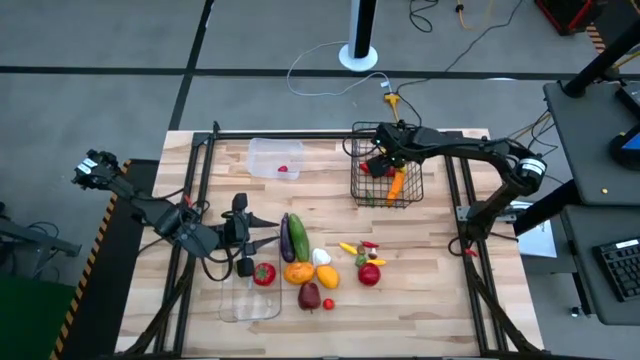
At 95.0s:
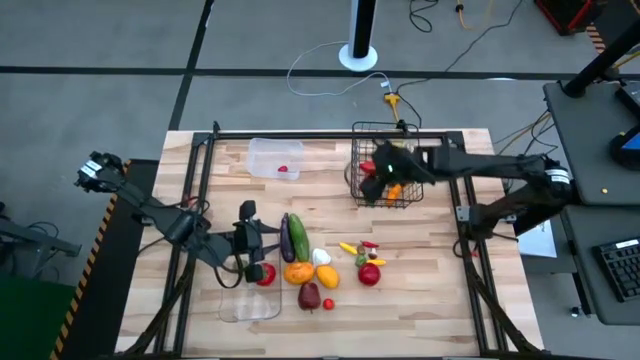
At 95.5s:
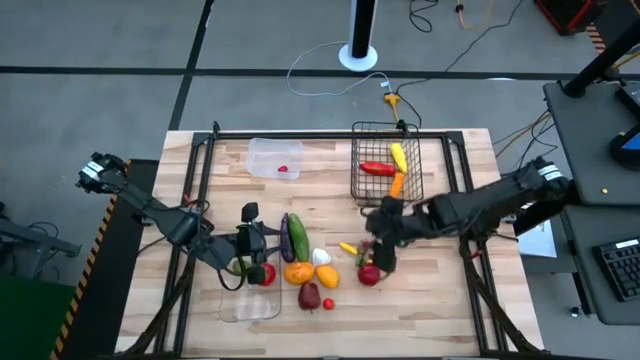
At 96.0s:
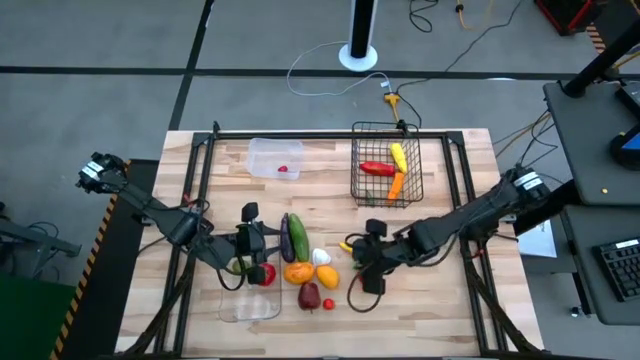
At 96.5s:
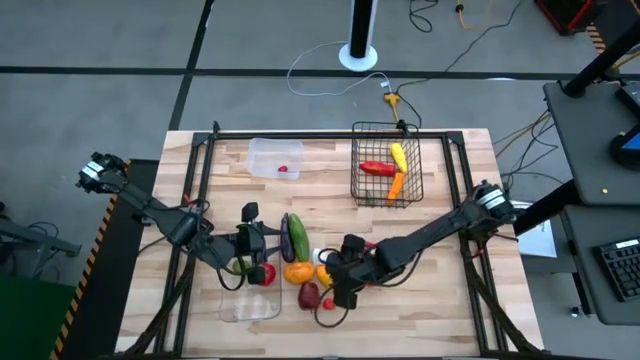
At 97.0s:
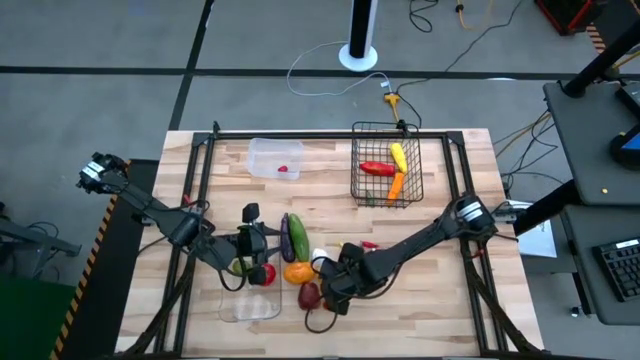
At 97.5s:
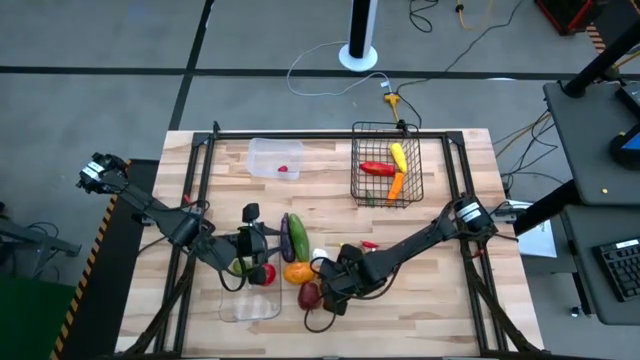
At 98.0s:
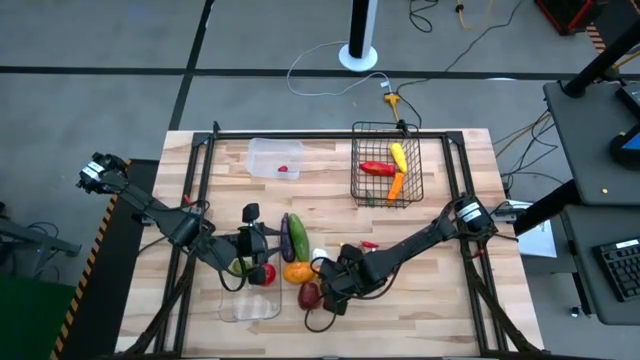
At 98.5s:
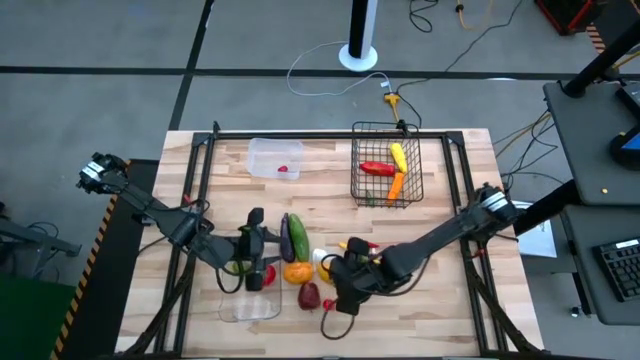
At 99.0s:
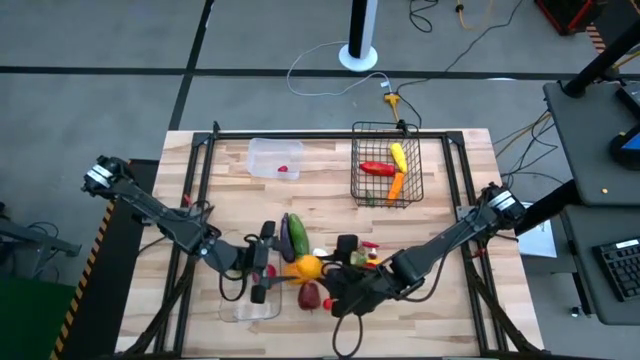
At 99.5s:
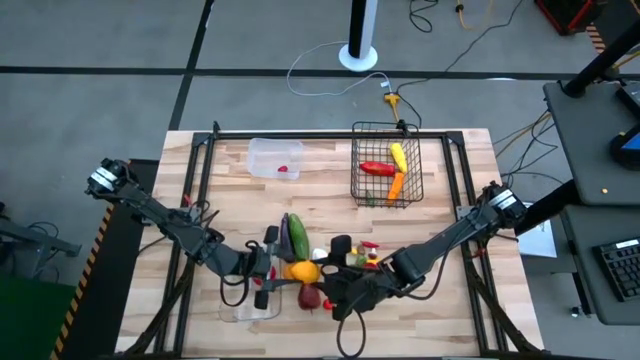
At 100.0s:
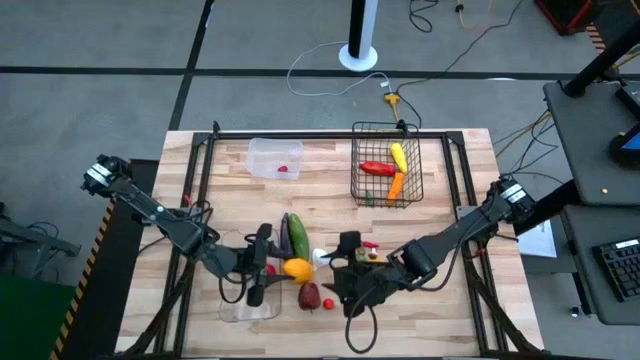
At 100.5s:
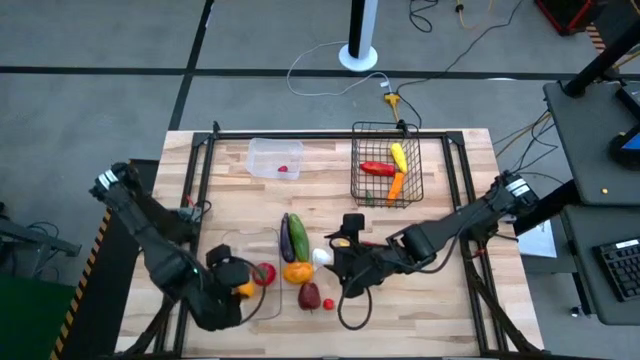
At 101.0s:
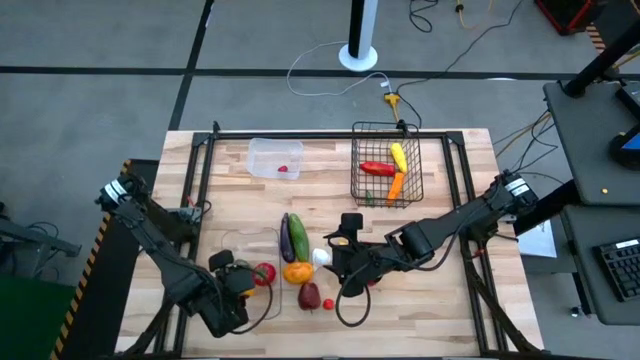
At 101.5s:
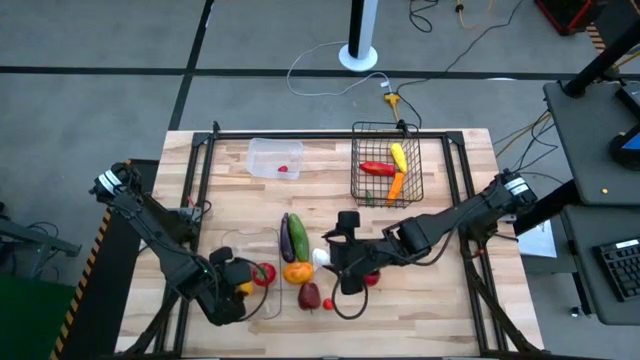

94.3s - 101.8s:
Task: Sort produce into baskets
Put the orange into the transparent bin

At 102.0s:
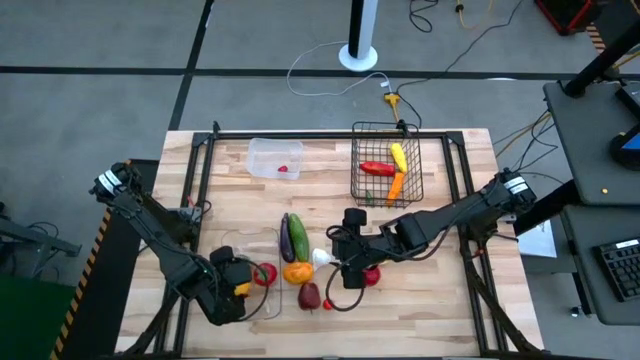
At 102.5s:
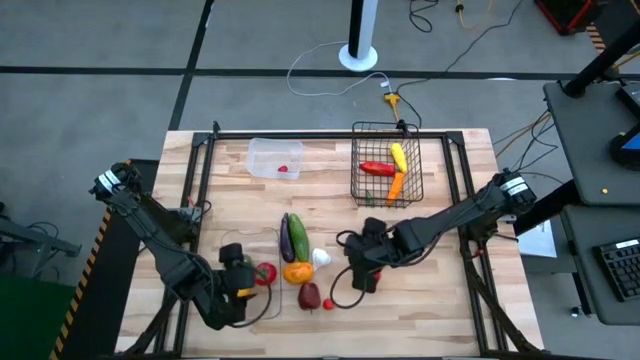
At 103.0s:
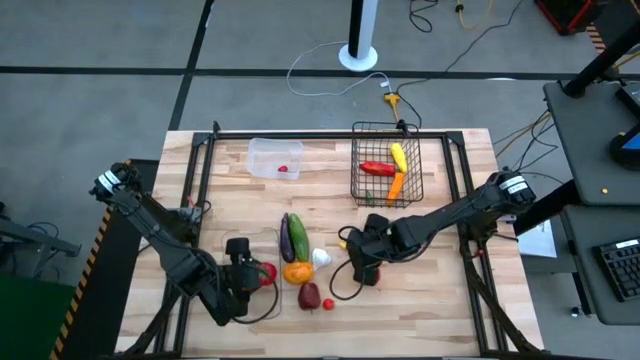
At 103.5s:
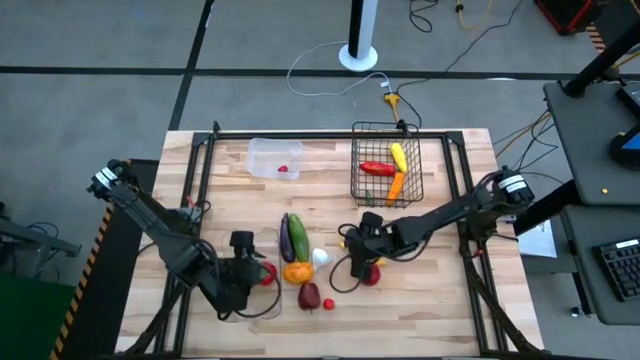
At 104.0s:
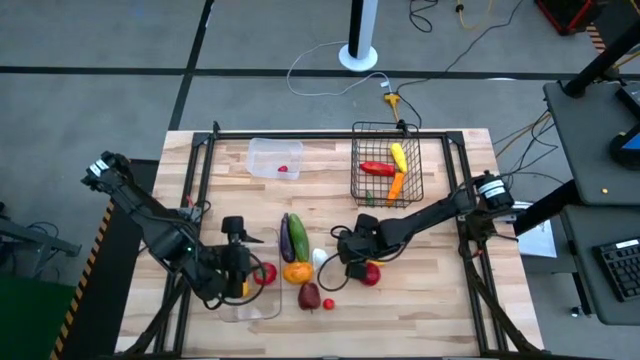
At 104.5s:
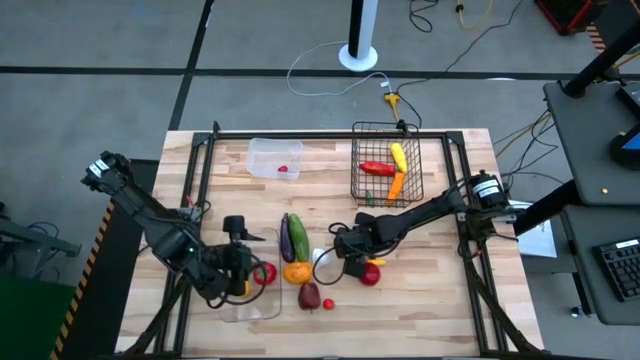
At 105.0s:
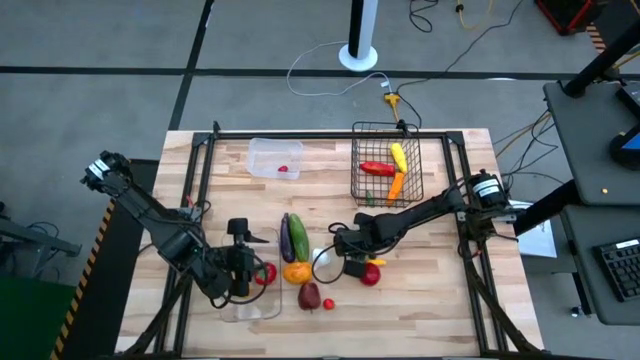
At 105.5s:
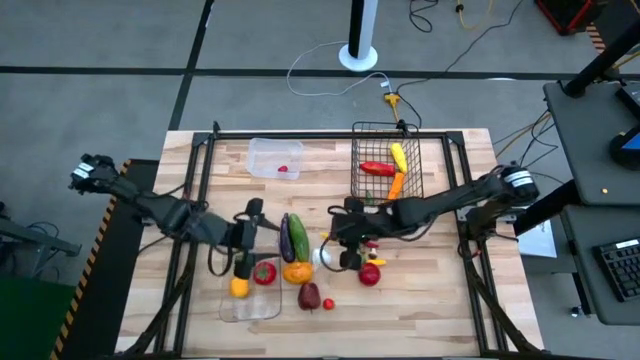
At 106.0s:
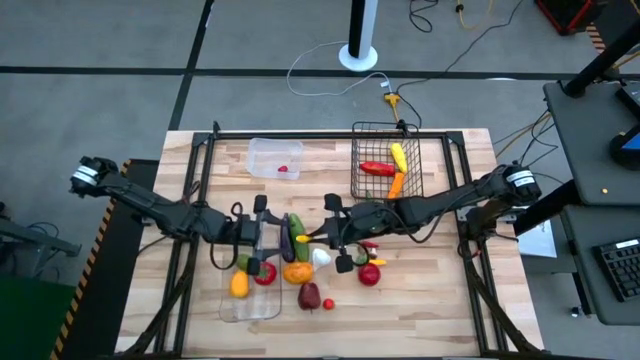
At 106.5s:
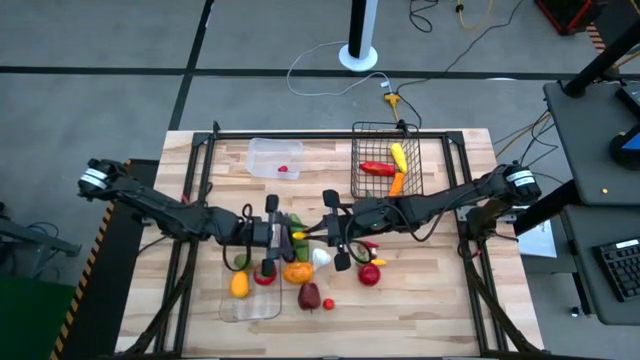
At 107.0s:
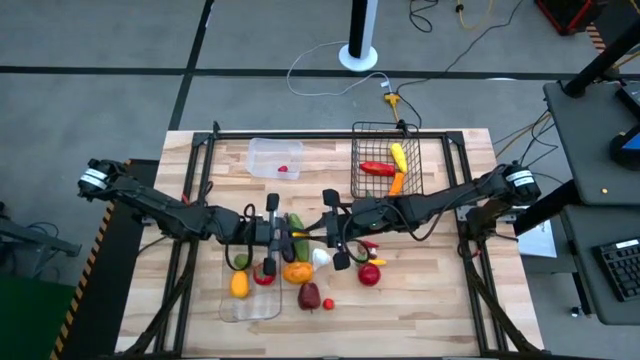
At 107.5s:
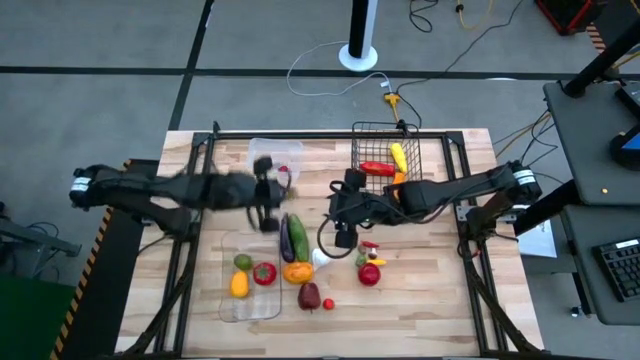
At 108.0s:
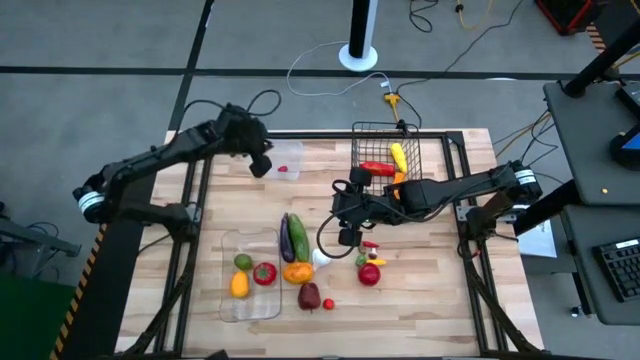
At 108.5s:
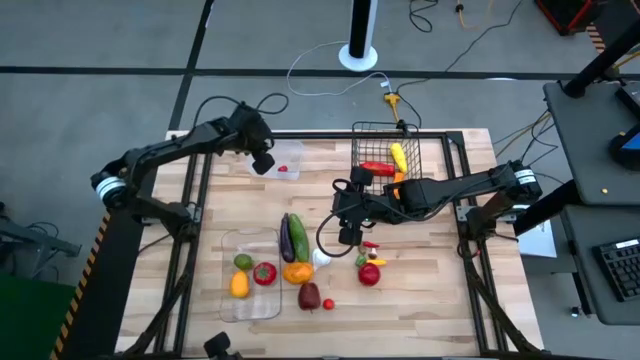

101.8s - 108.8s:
Put the left yellow baby corn into the white bin

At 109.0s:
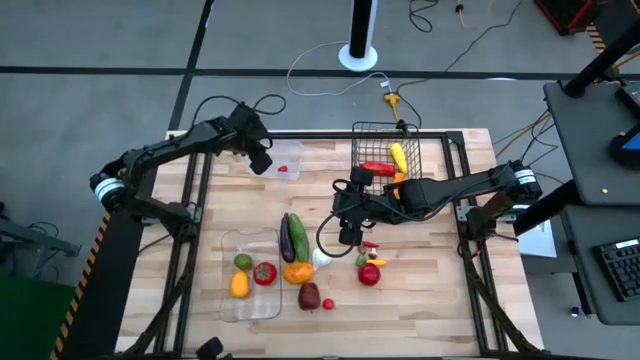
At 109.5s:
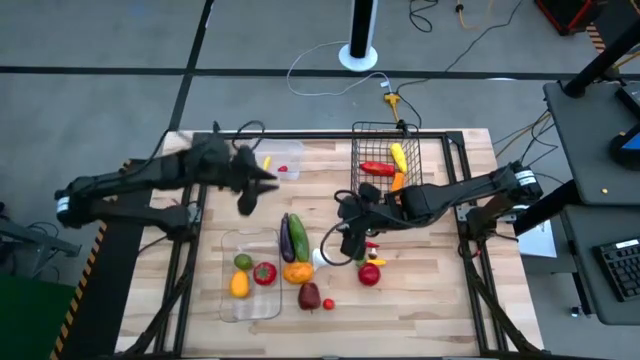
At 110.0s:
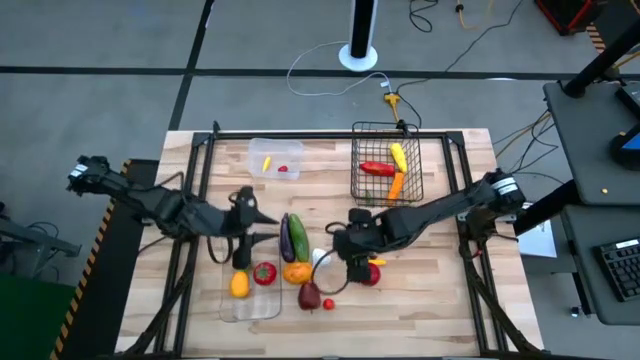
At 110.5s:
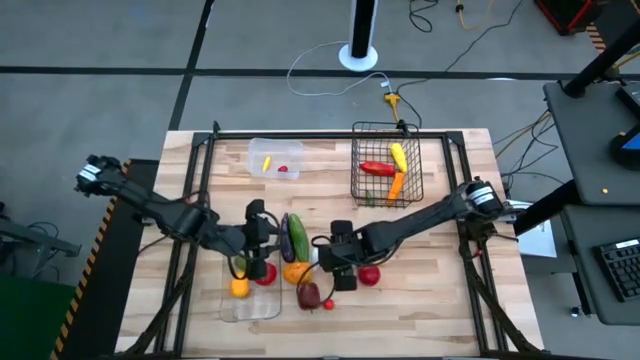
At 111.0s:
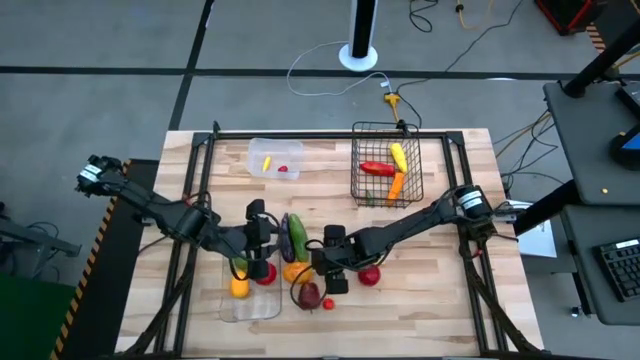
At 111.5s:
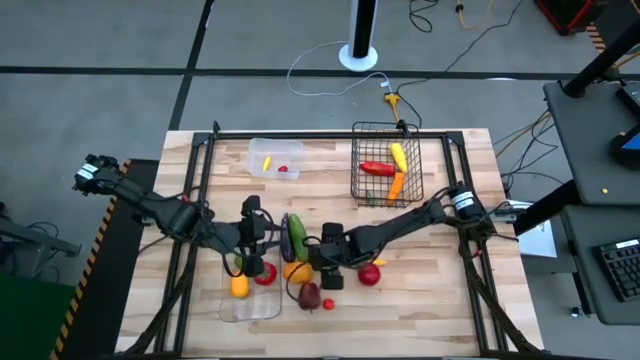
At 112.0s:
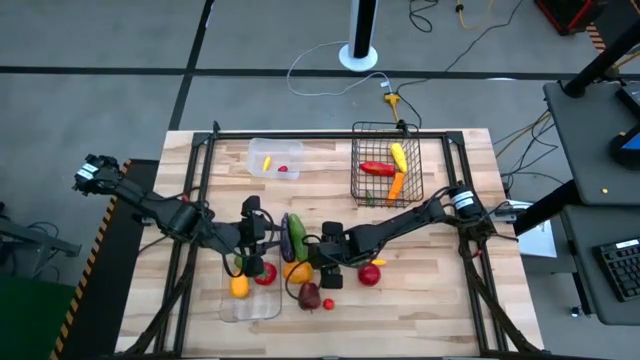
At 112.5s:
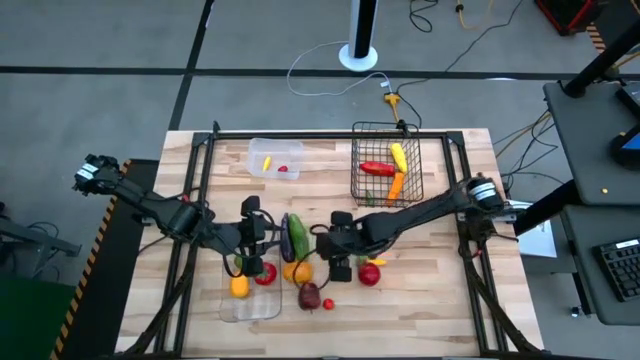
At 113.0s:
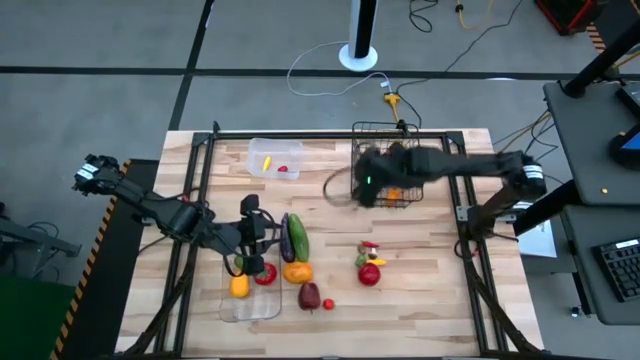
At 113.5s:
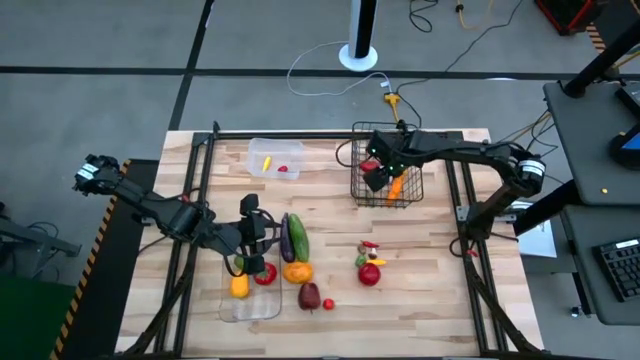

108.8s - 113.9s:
Put the garlic into the wire basket

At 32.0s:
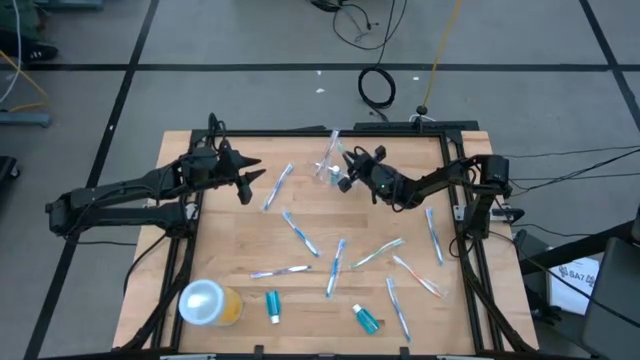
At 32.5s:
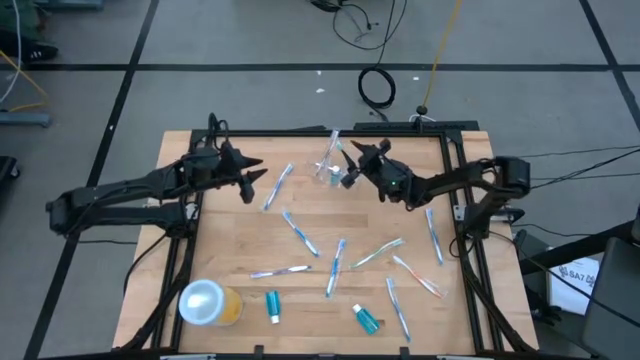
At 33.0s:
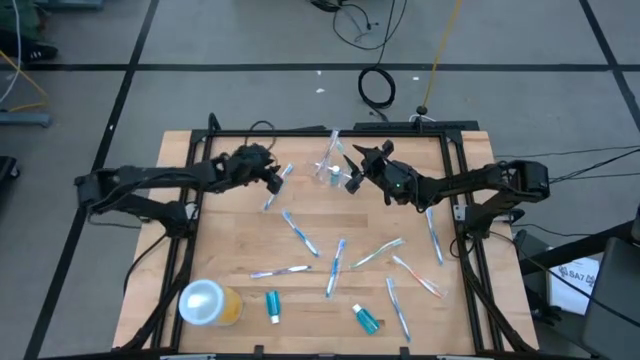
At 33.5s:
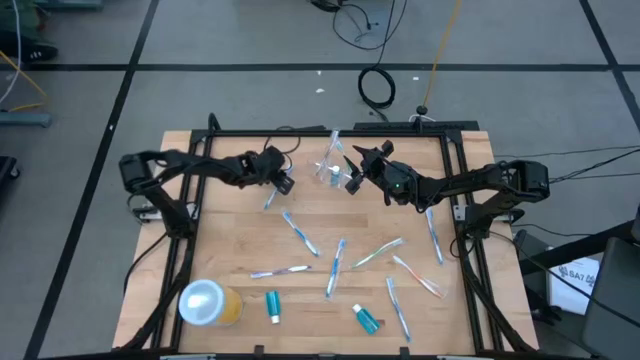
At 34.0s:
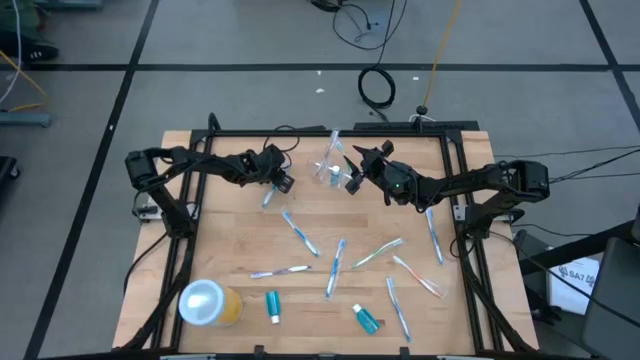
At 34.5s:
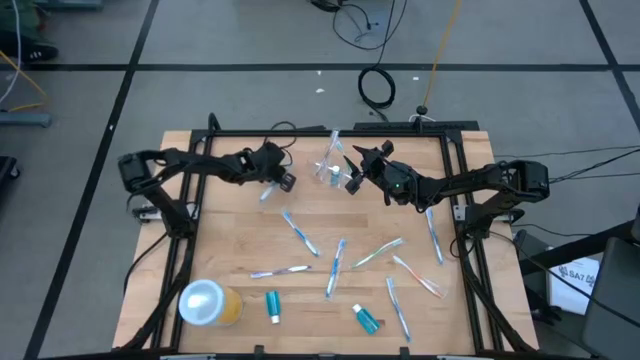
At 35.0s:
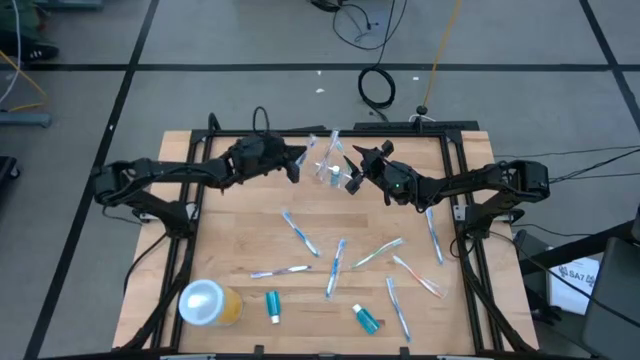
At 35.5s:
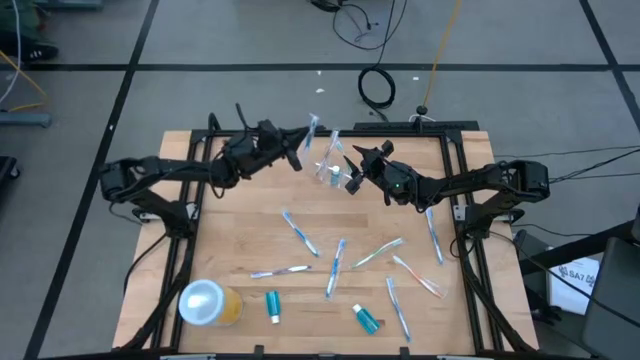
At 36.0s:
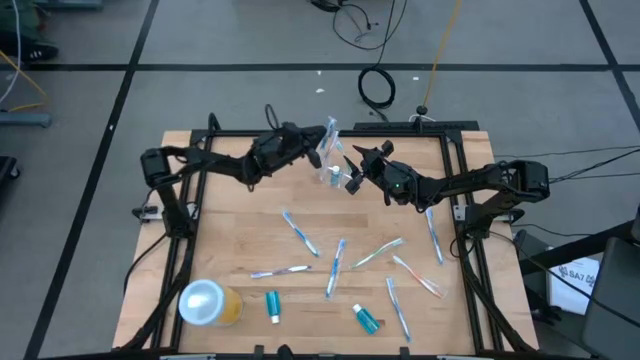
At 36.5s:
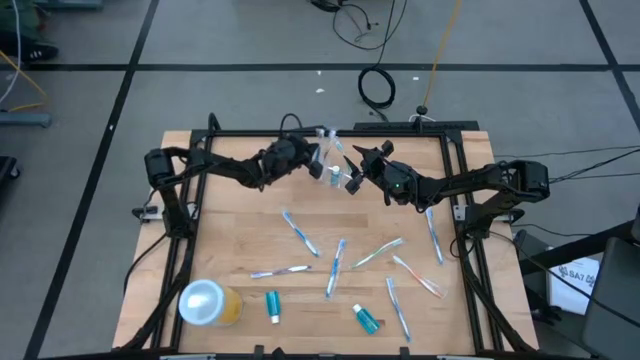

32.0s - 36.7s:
Task: Pick & Place toothbrushing station
Put the blue toothbrush into the transparent organizer
